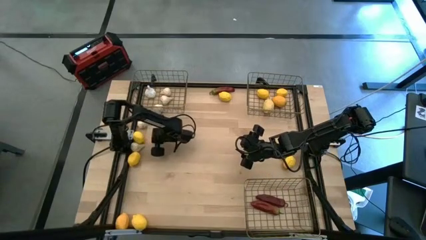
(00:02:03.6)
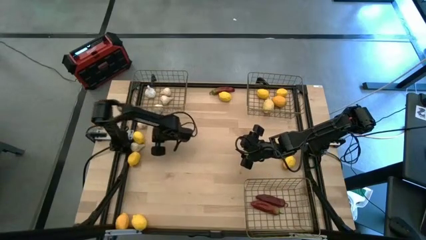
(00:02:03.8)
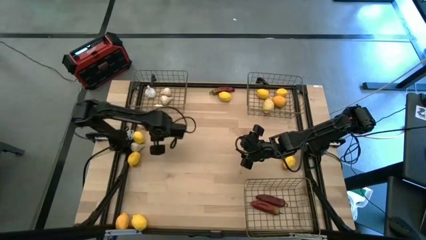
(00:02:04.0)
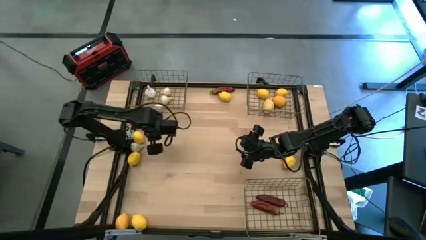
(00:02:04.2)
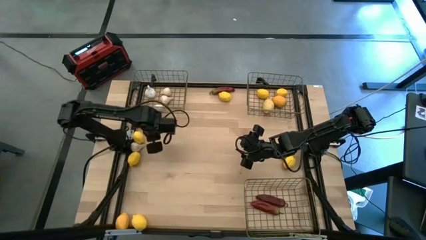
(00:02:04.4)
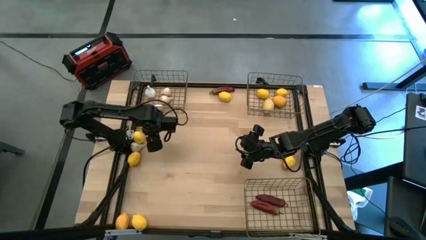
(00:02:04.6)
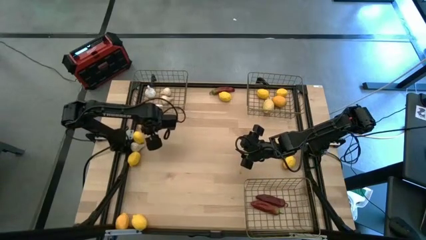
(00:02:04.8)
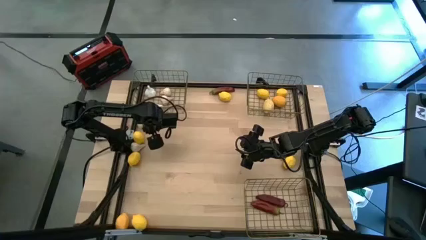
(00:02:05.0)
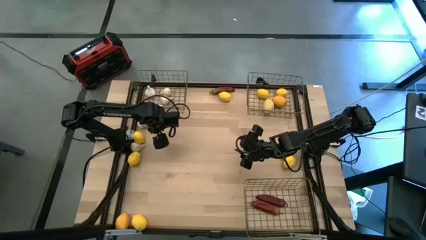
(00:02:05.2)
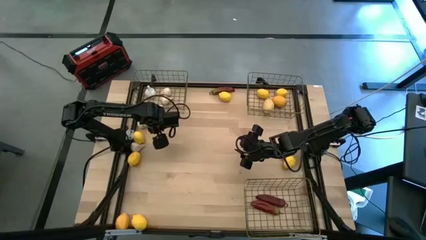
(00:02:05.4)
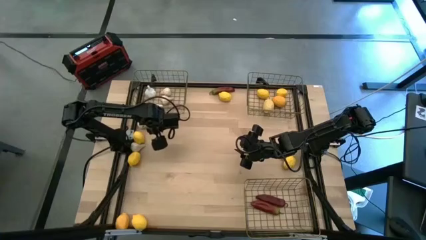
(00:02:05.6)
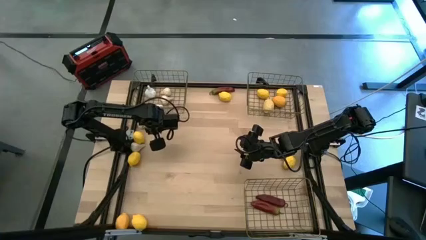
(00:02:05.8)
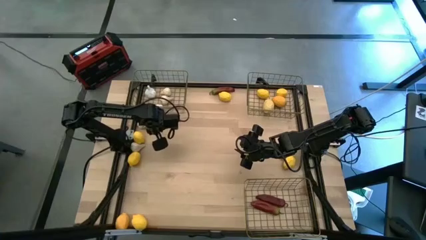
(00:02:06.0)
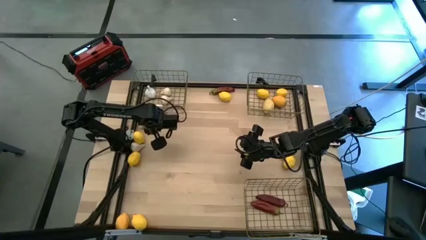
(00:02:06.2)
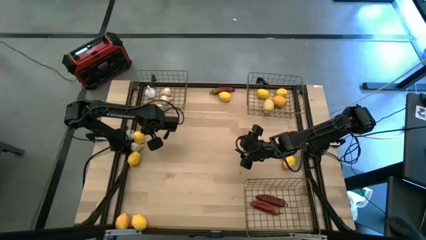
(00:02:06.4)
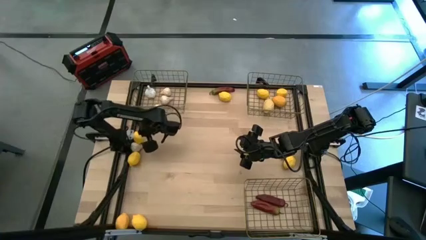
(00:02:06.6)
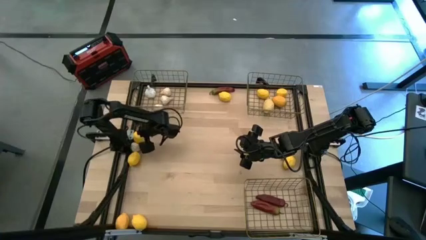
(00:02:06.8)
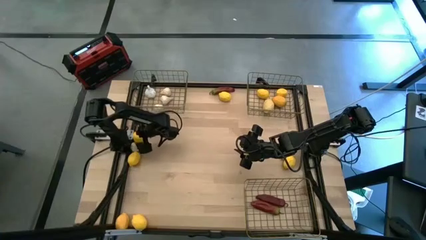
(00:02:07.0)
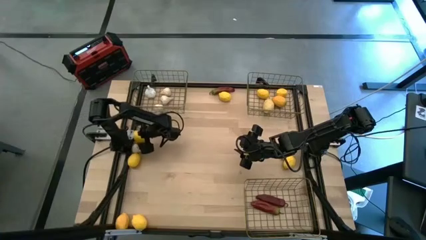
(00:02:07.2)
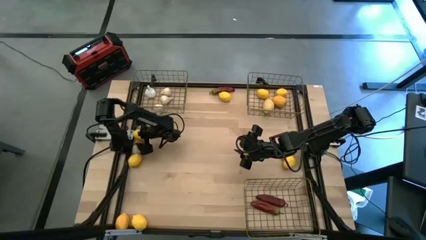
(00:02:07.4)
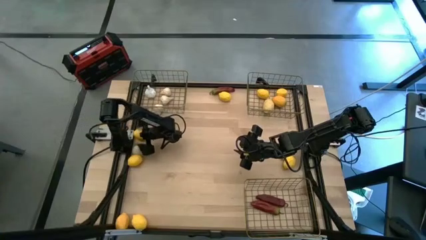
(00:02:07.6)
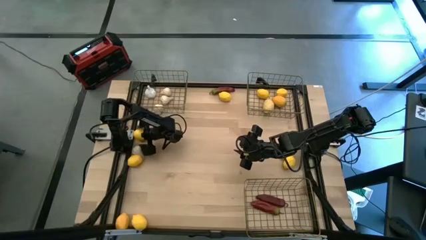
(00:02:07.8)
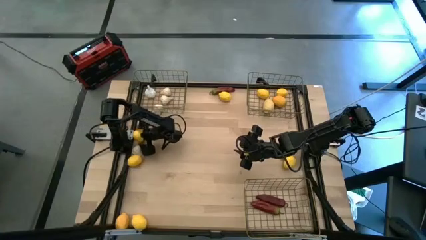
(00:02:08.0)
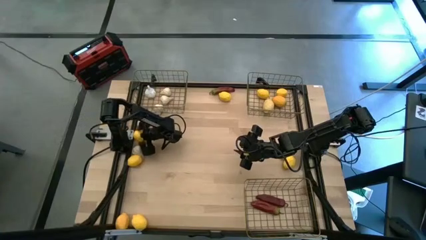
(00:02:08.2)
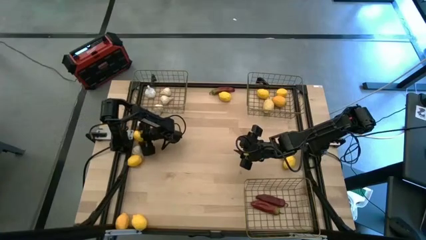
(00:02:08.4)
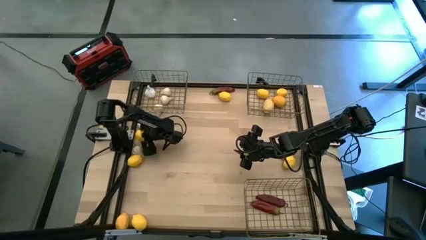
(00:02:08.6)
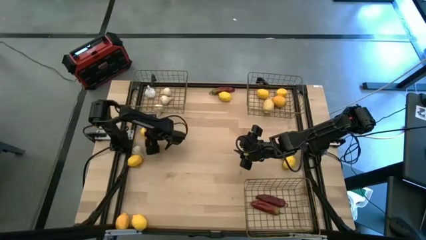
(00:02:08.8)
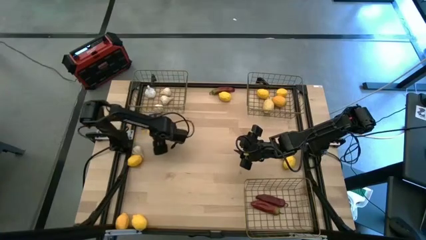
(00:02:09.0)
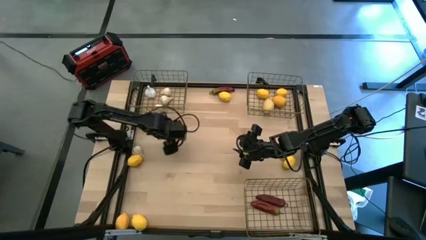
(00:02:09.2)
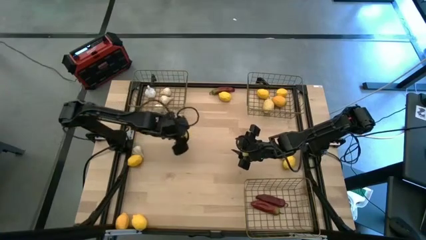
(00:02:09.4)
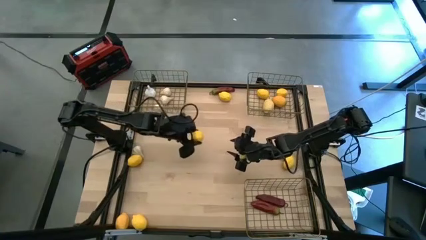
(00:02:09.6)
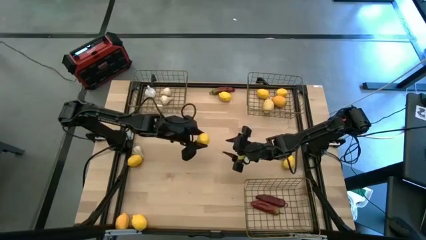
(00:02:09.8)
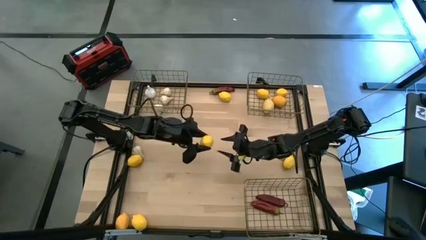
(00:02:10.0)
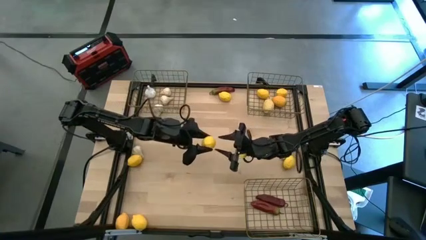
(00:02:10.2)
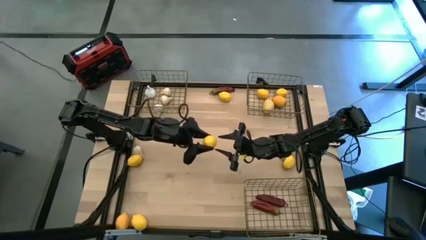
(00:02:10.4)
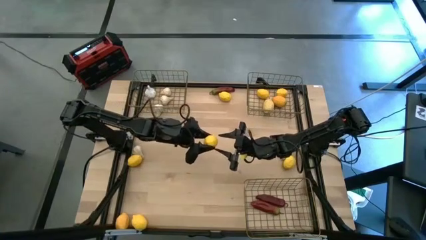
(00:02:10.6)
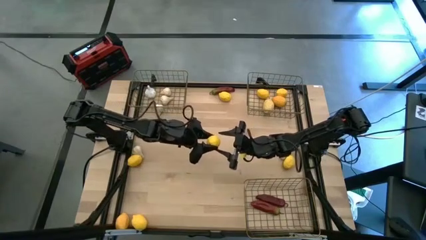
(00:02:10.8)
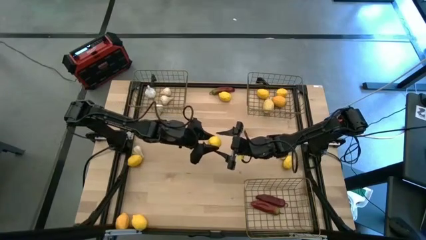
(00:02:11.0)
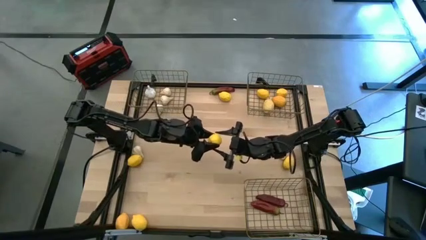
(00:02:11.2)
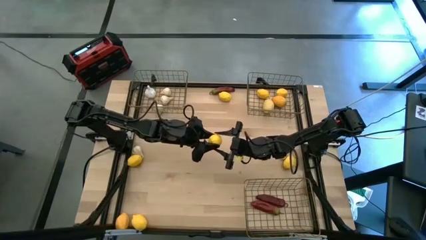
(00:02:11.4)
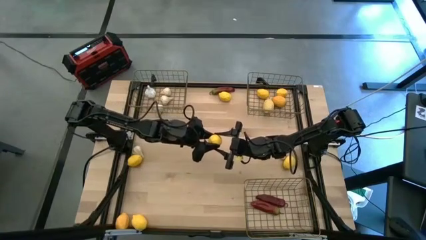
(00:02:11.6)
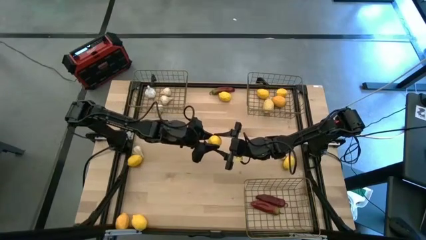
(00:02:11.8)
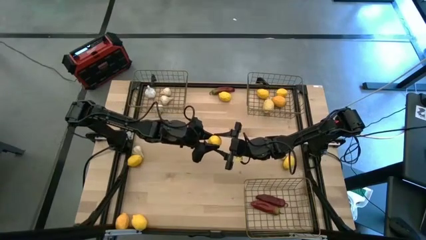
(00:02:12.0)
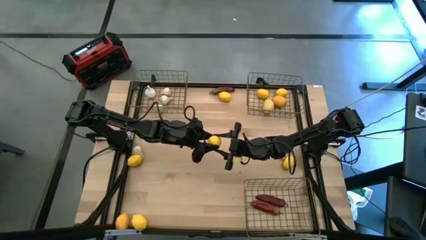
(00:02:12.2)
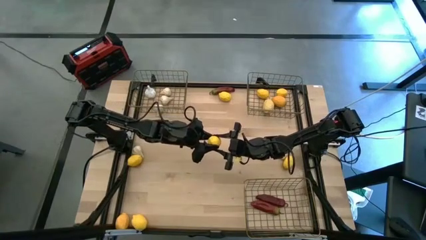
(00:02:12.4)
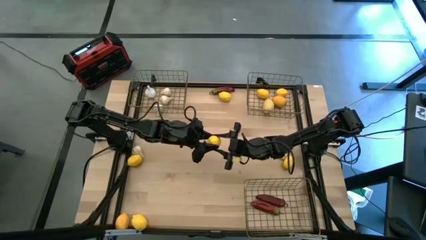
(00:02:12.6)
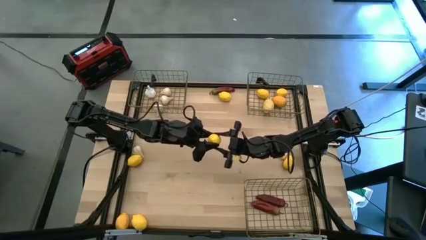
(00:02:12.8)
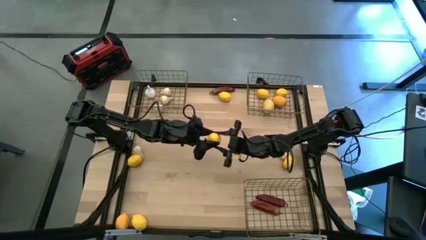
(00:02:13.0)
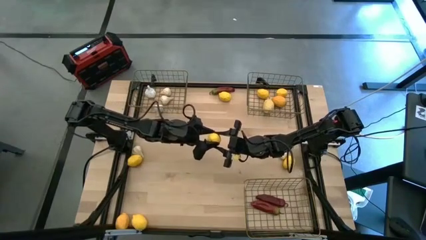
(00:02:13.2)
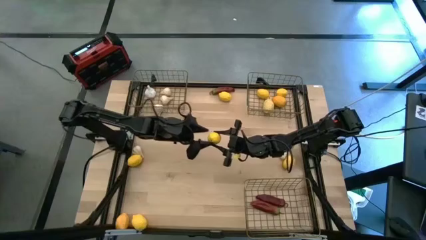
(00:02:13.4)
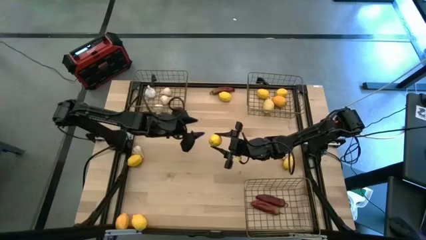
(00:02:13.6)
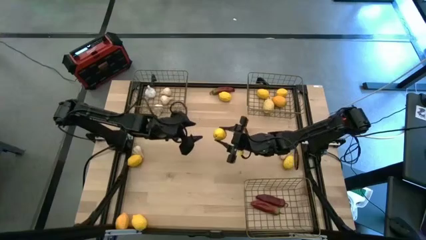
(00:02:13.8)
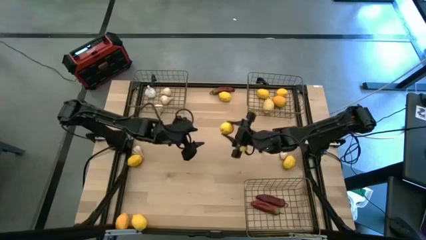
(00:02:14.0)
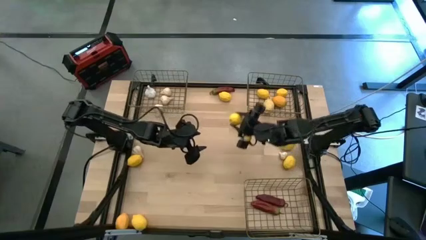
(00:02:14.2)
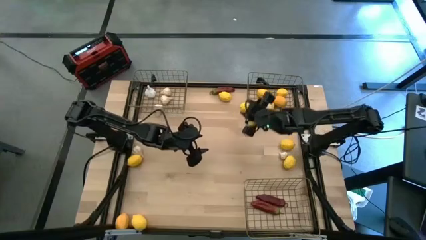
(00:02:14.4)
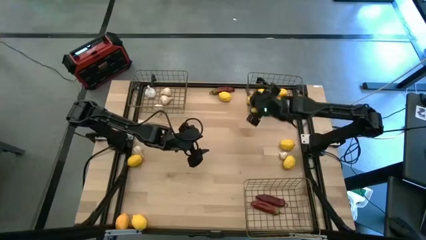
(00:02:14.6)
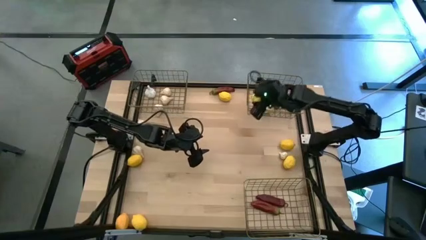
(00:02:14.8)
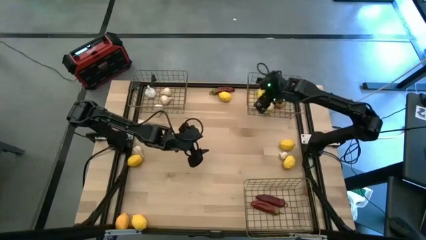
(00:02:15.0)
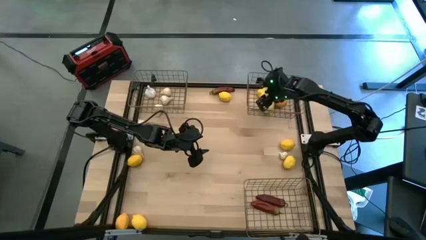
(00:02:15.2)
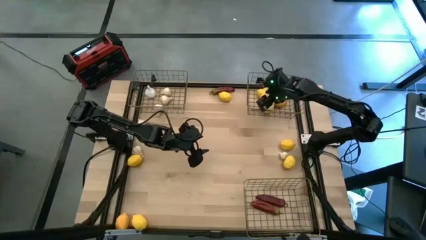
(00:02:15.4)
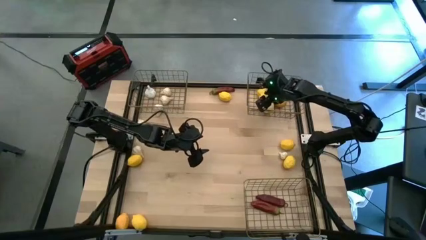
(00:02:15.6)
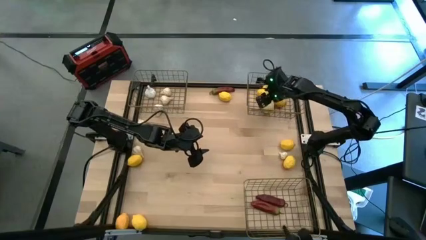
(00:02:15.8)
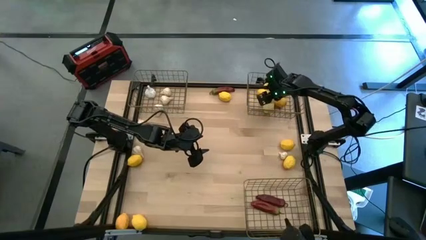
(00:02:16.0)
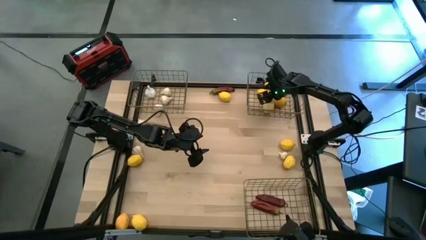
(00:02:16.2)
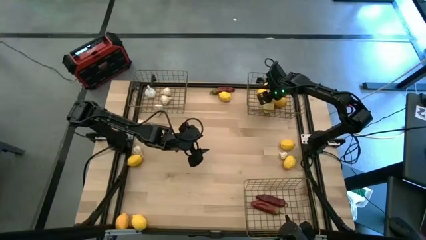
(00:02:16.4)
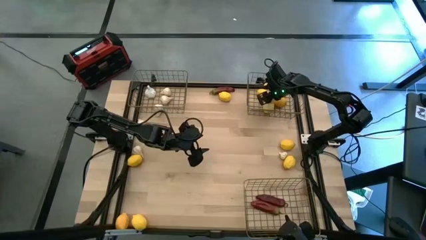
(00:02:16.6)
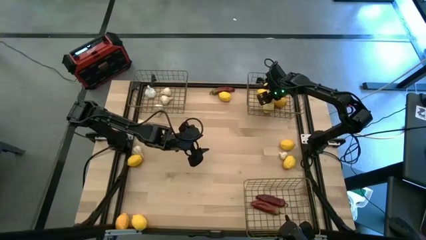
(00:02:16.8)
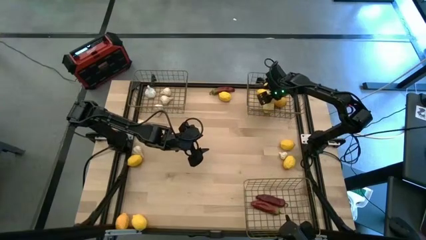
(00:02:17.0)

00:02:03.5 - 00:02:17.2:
Task: Sort produce into baskets
Put the yellow lemon into the top right wire basket
